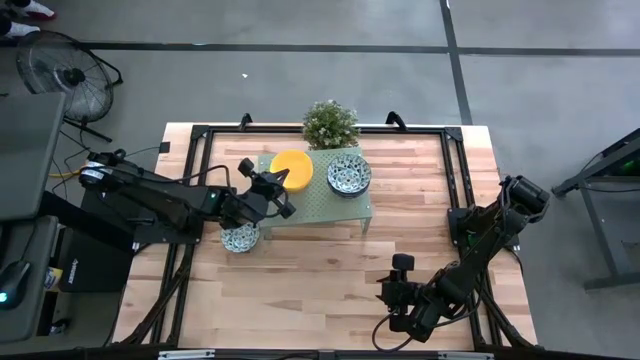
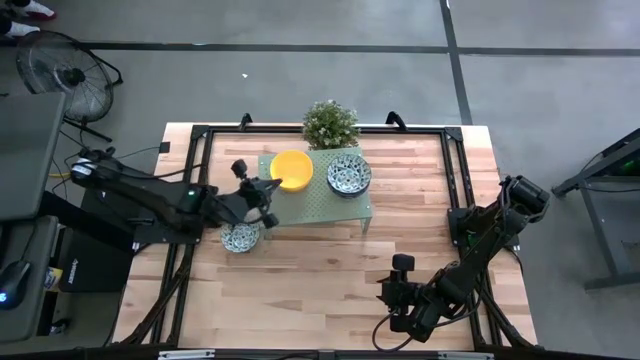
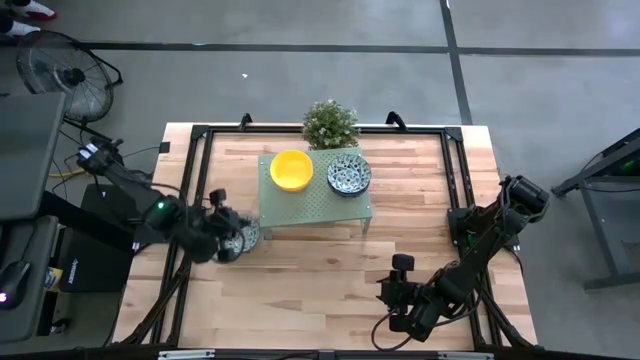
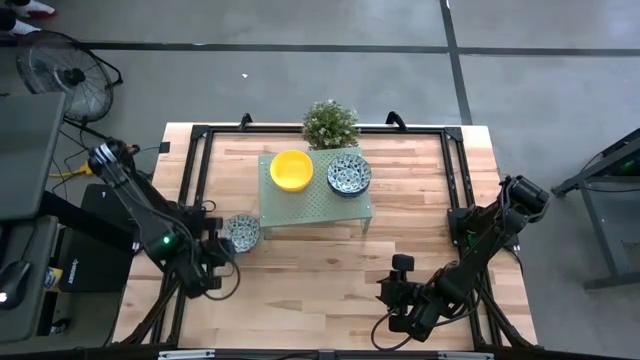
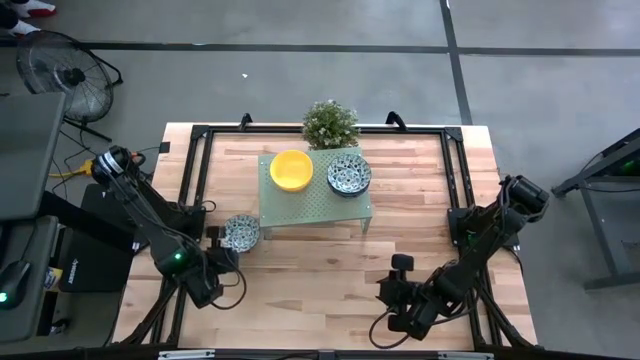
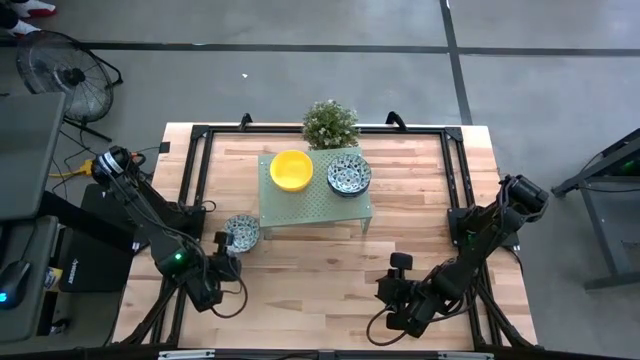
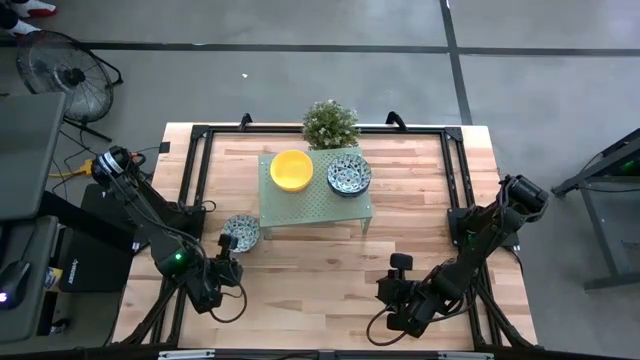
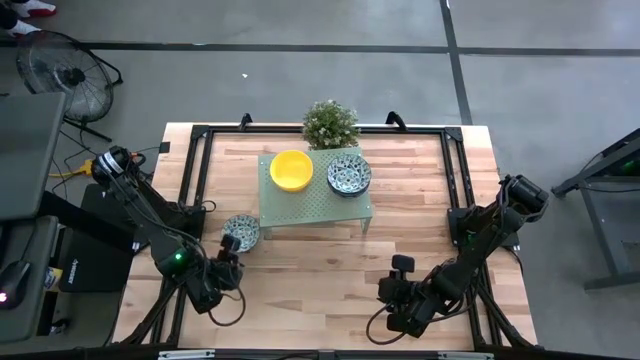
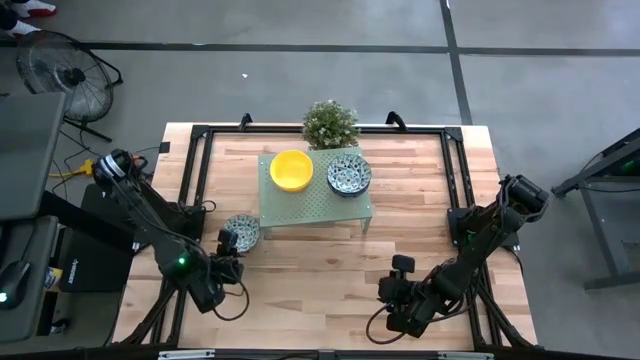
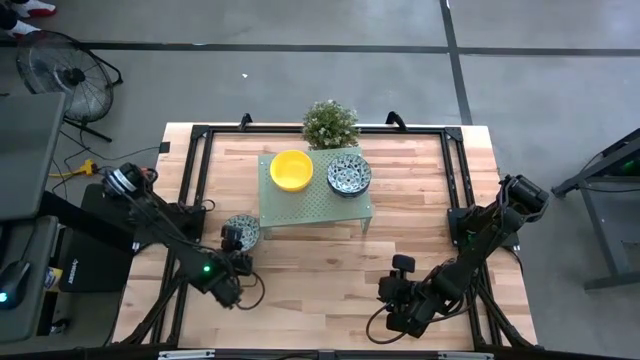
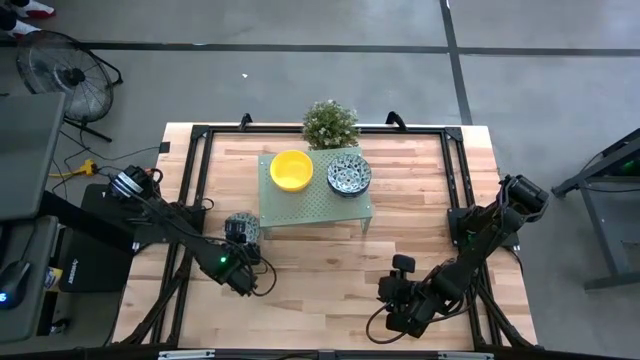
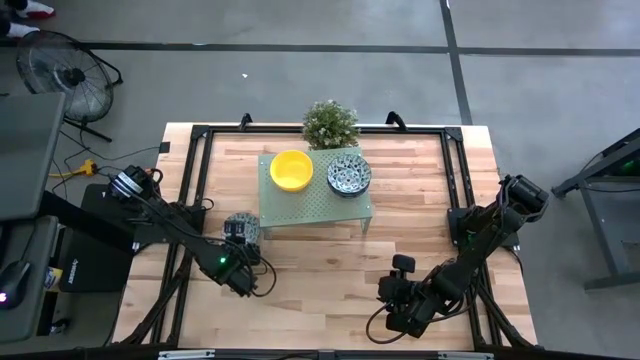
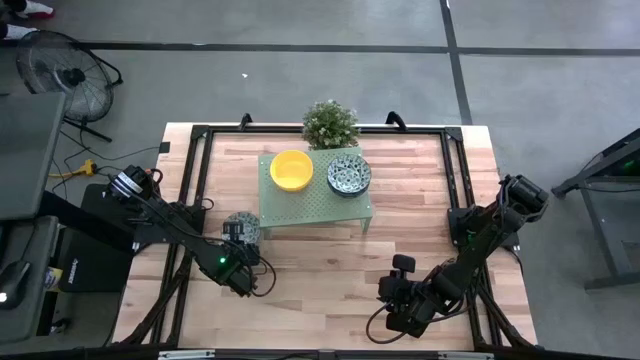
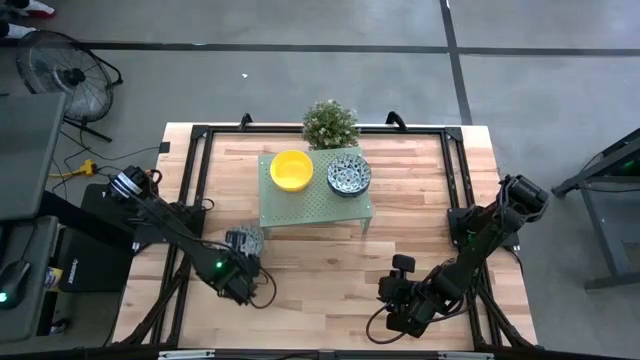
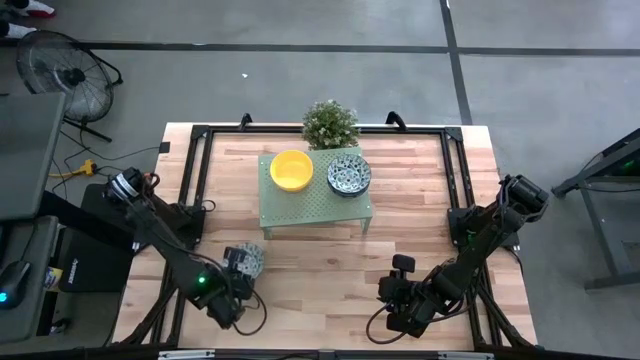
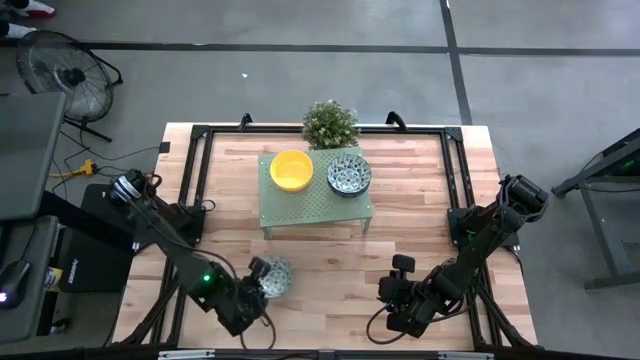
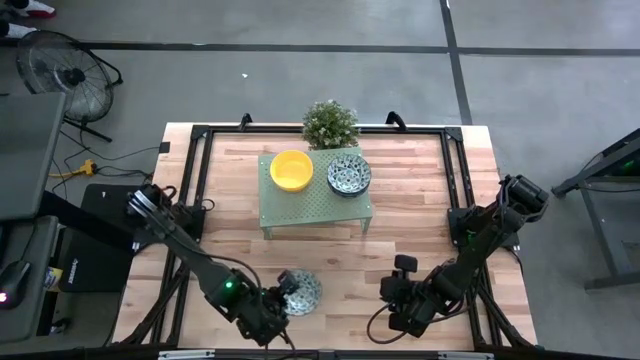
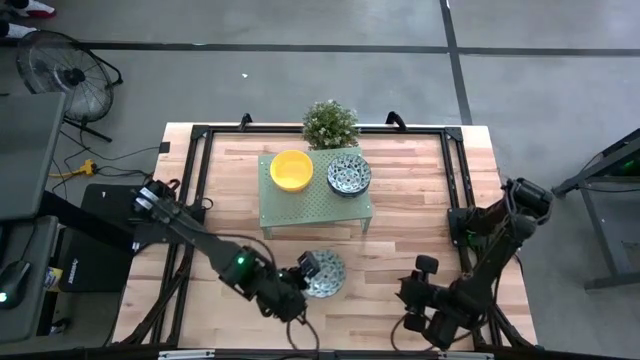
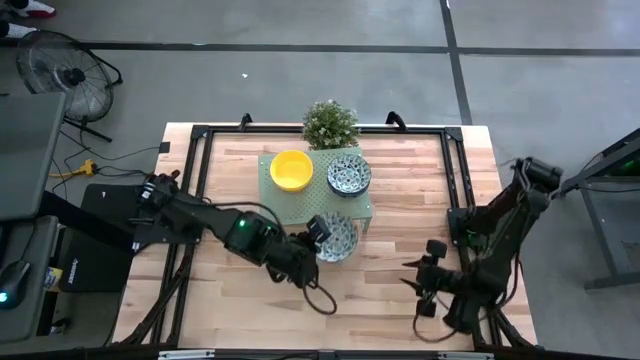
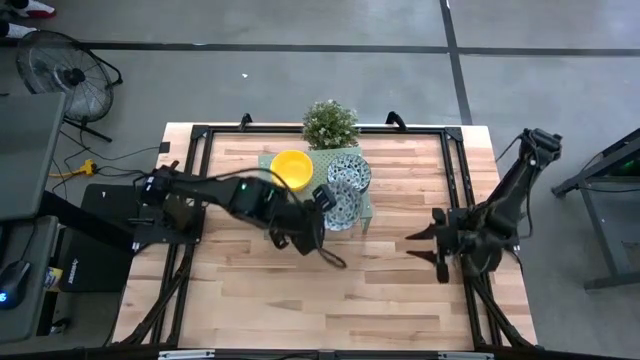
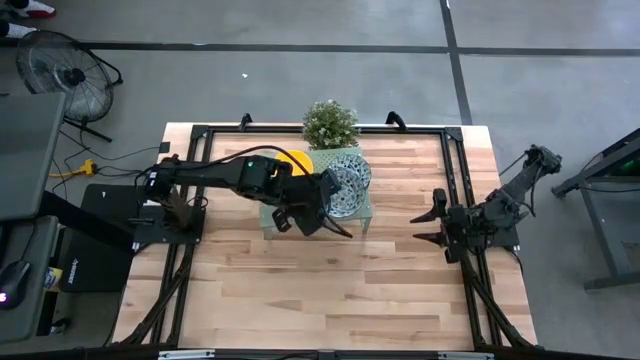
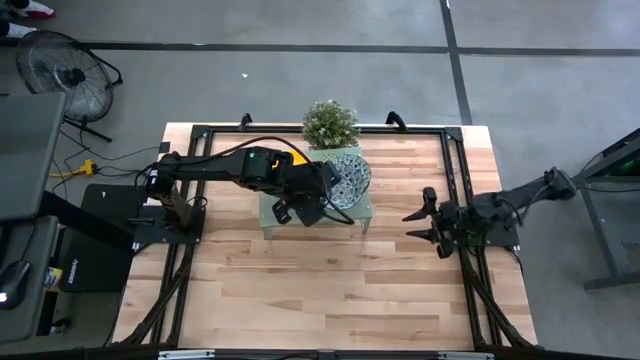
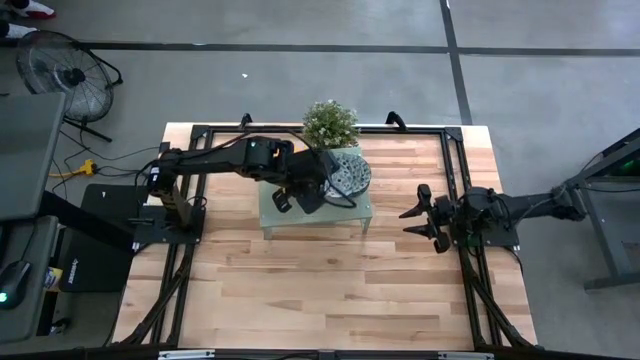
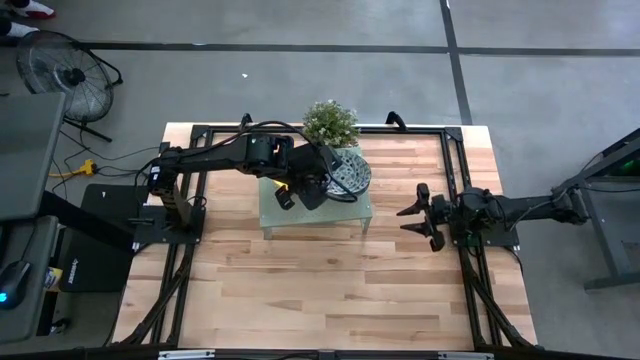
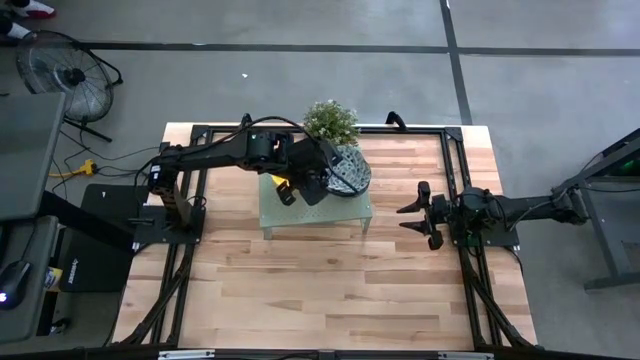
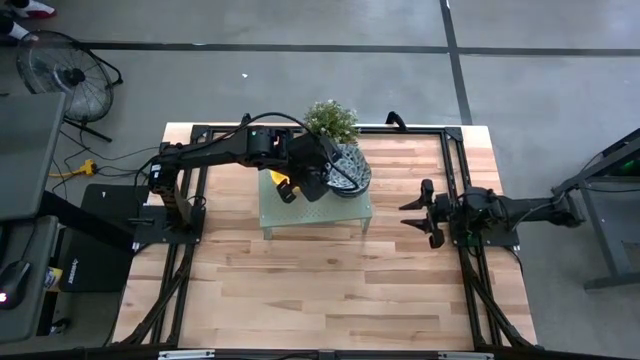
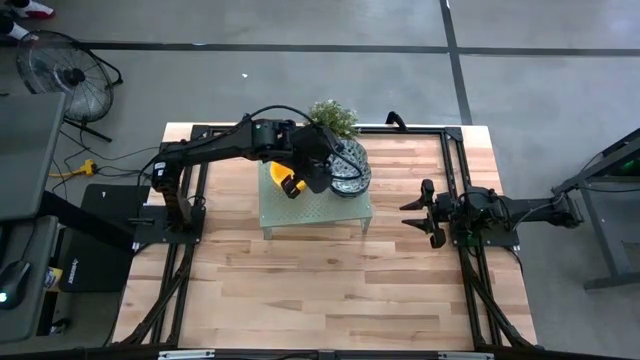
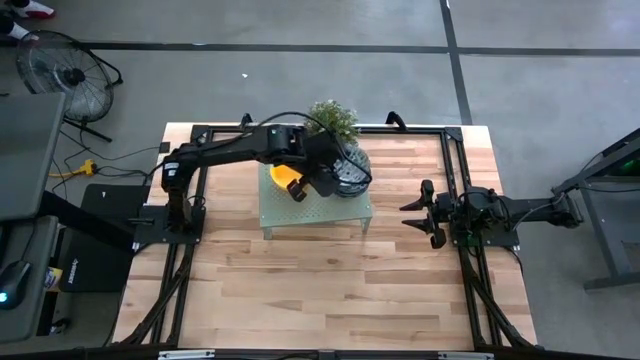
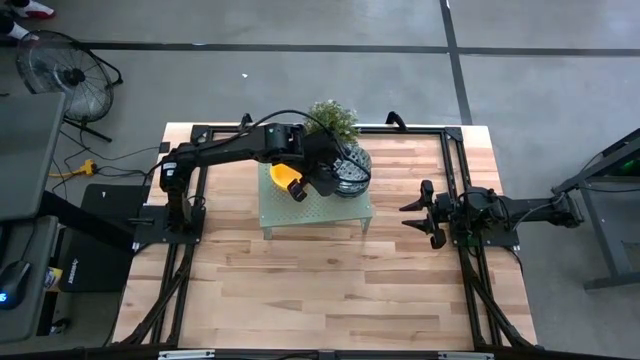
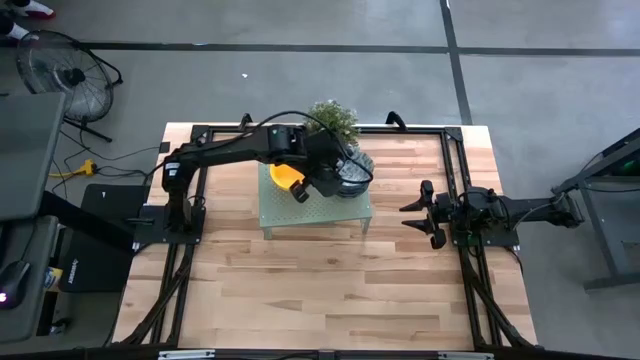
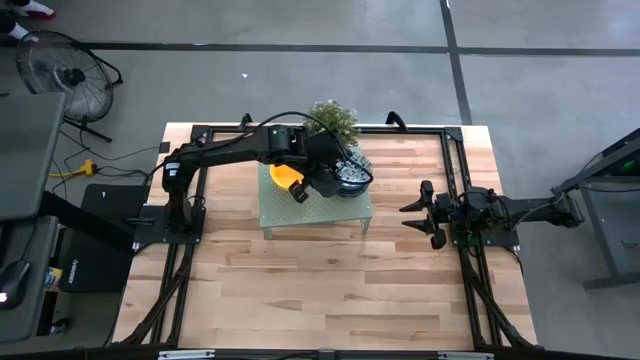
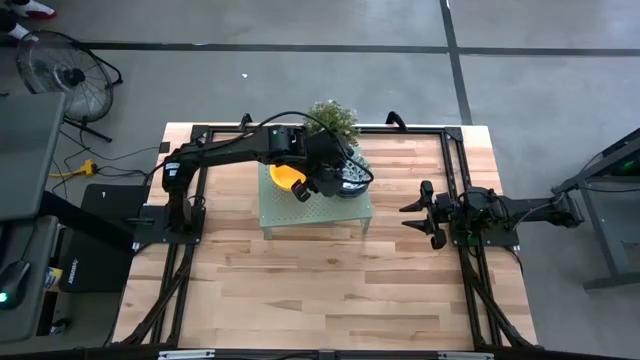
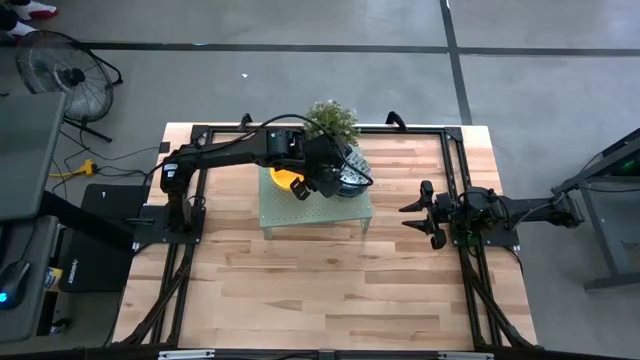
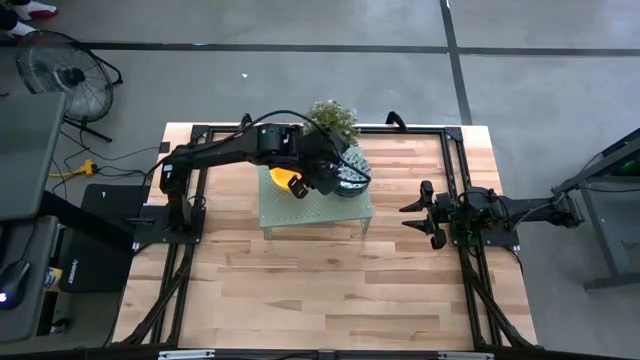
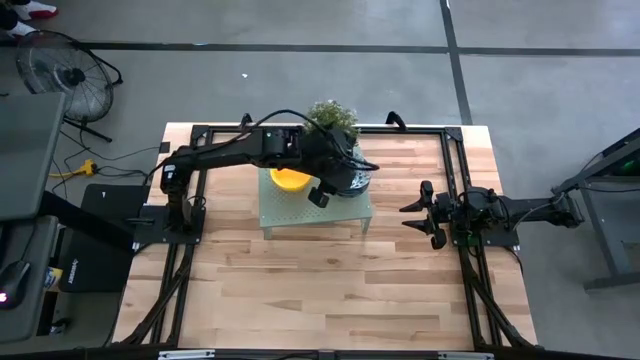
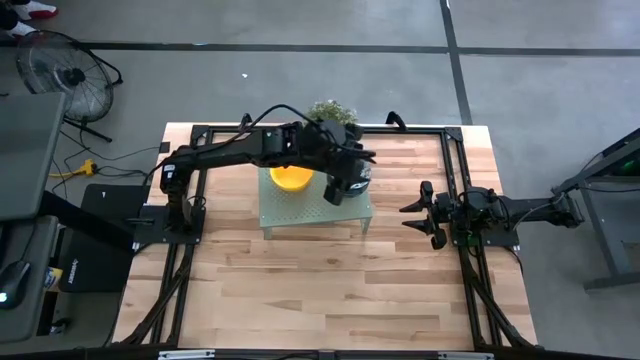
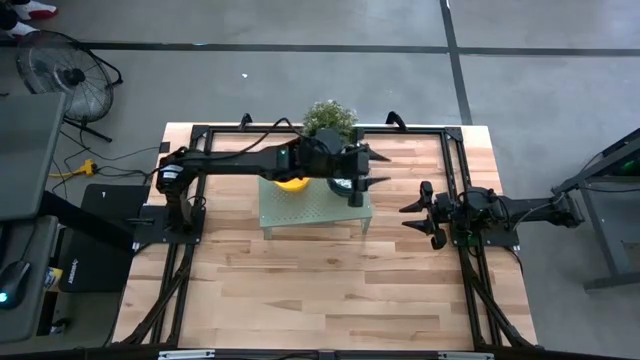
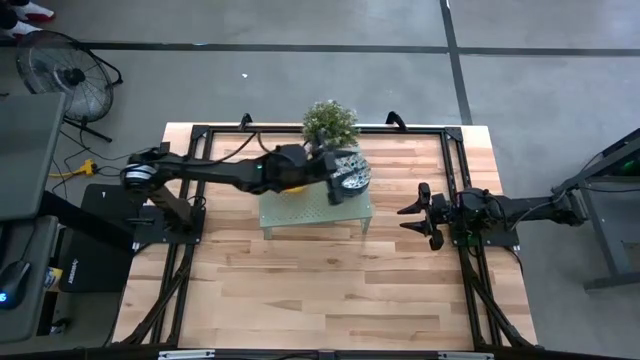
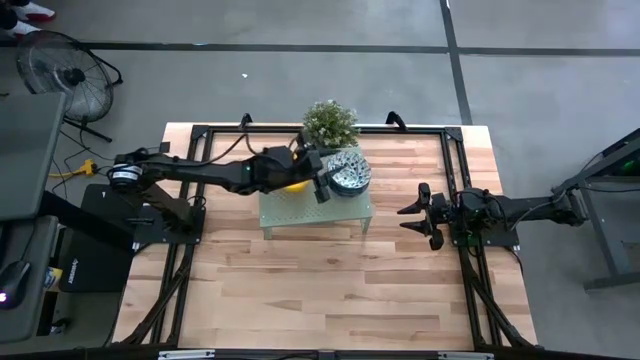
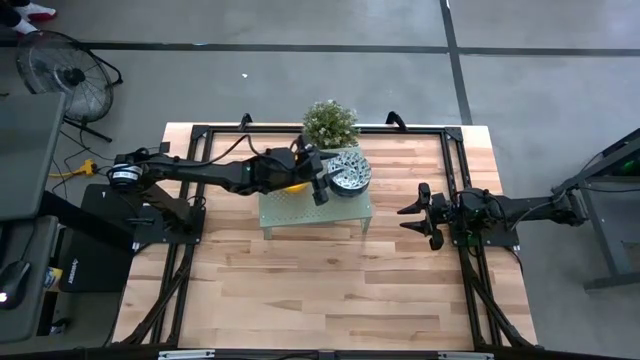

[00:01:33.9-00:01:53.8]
Task: Pick & Place Mini bowls
Stack the blue patterned bowl on top of the blue patterned bowl on the shelf
